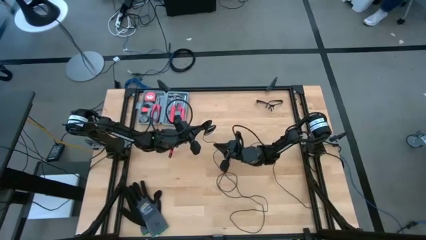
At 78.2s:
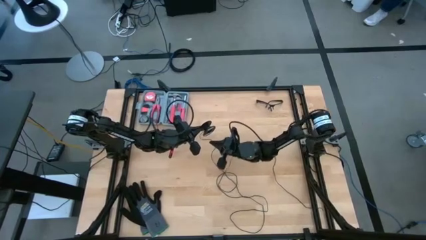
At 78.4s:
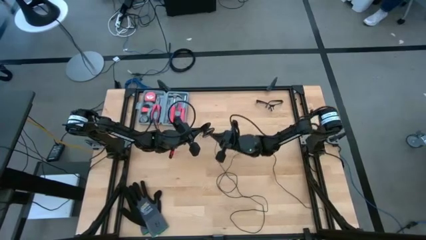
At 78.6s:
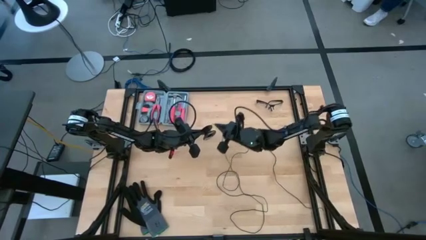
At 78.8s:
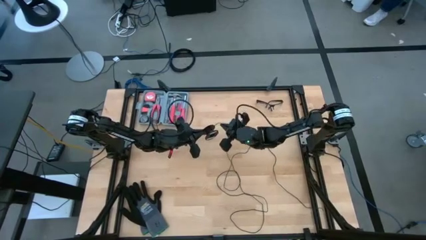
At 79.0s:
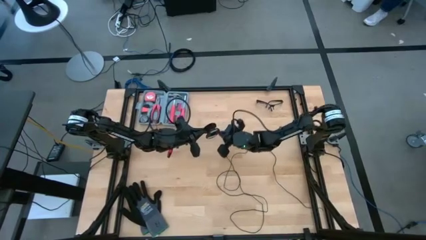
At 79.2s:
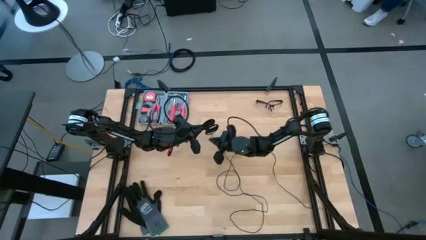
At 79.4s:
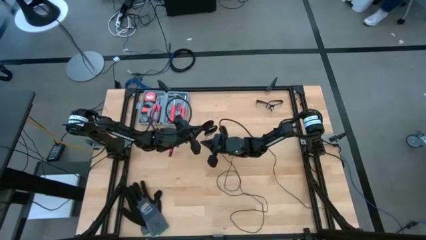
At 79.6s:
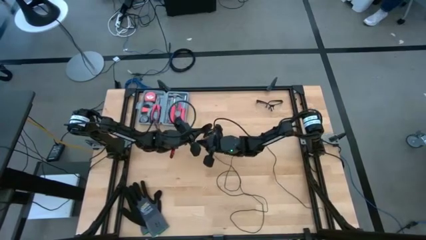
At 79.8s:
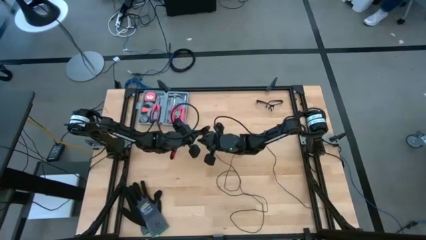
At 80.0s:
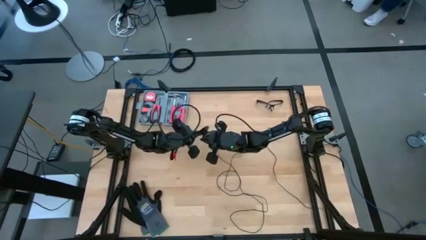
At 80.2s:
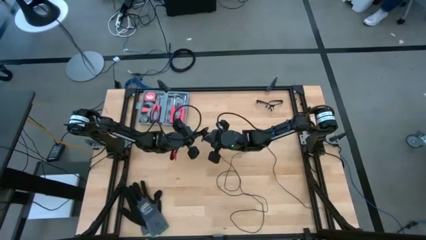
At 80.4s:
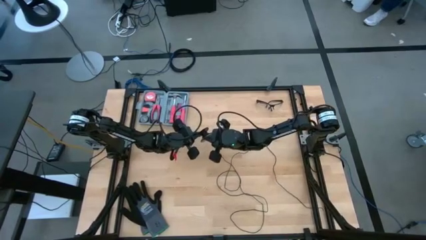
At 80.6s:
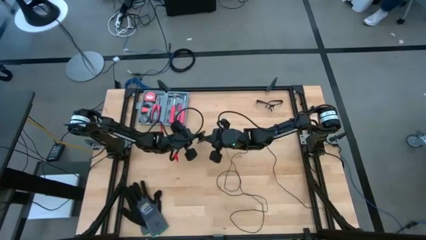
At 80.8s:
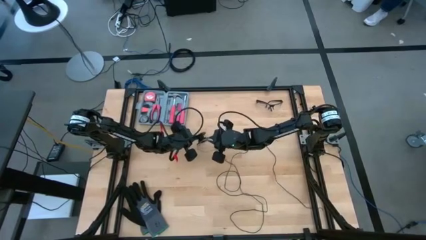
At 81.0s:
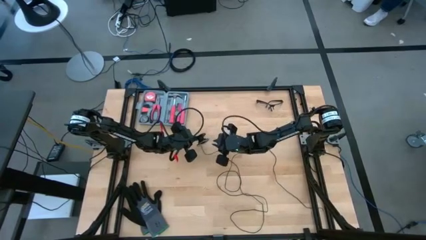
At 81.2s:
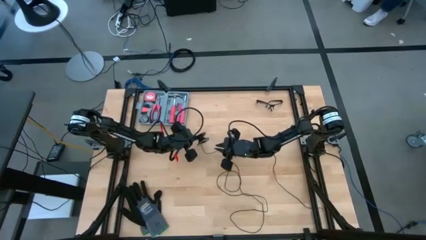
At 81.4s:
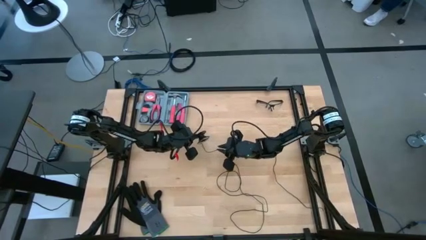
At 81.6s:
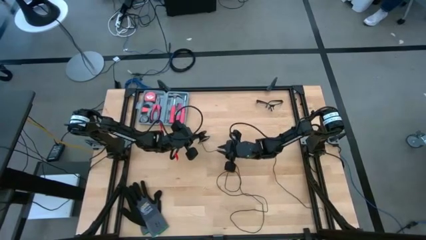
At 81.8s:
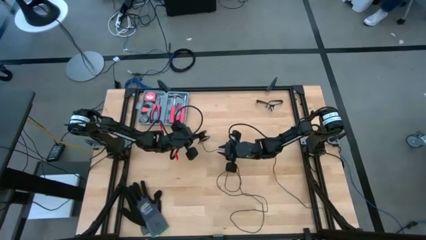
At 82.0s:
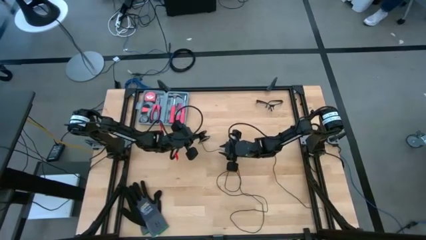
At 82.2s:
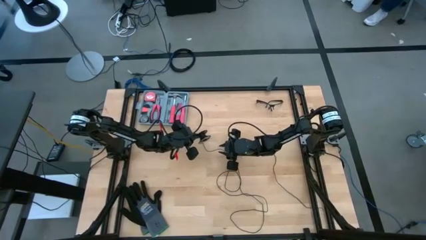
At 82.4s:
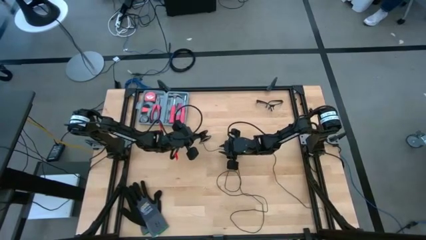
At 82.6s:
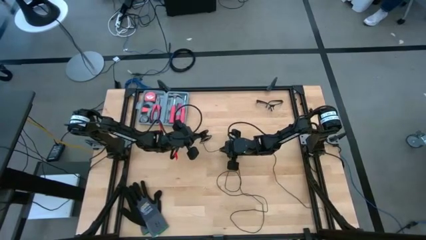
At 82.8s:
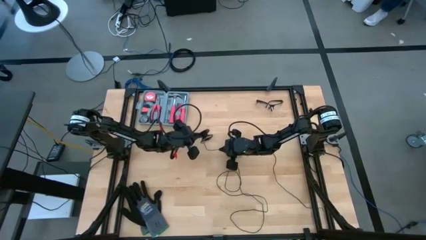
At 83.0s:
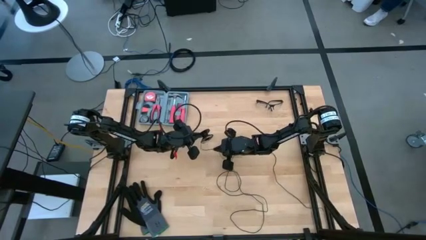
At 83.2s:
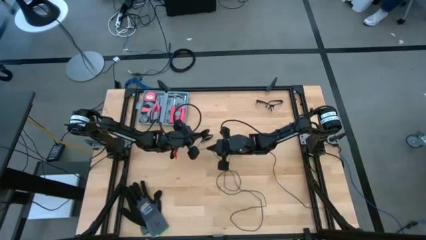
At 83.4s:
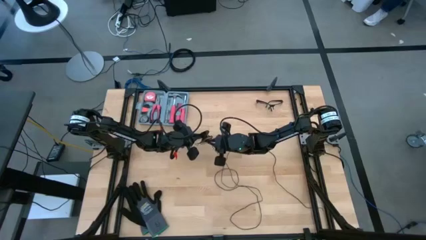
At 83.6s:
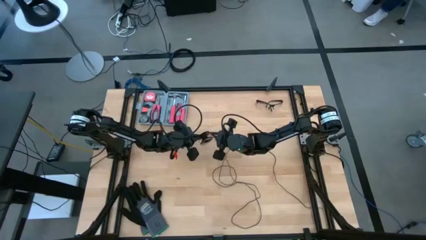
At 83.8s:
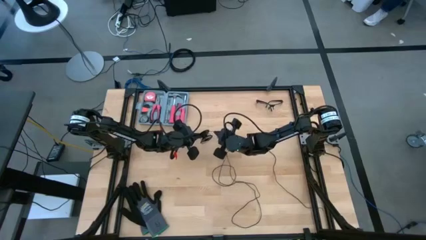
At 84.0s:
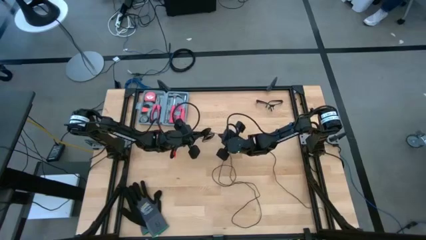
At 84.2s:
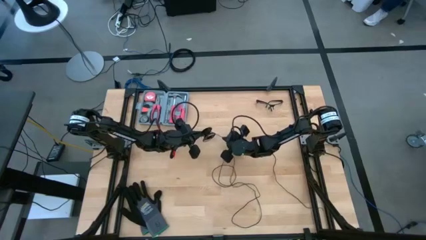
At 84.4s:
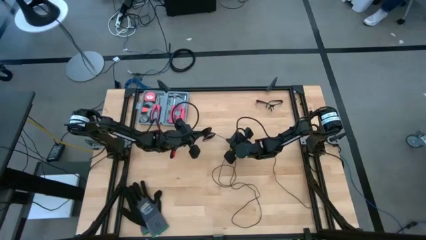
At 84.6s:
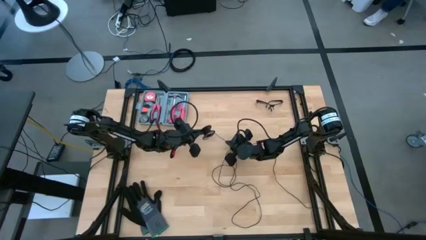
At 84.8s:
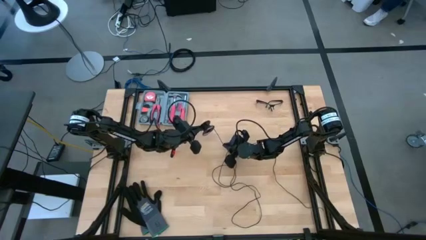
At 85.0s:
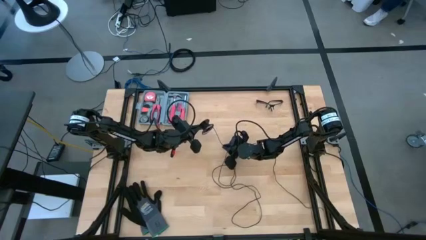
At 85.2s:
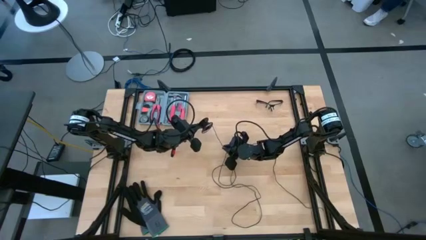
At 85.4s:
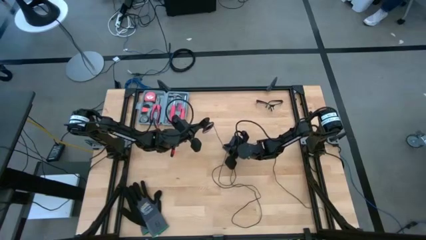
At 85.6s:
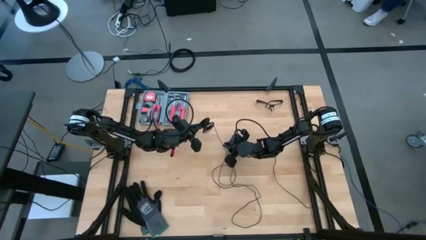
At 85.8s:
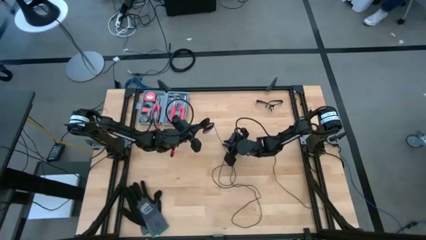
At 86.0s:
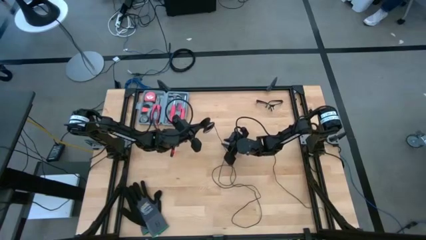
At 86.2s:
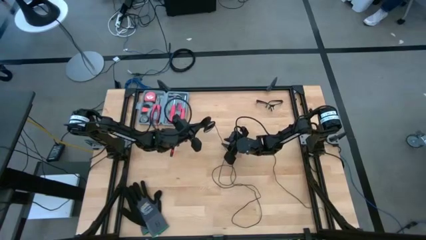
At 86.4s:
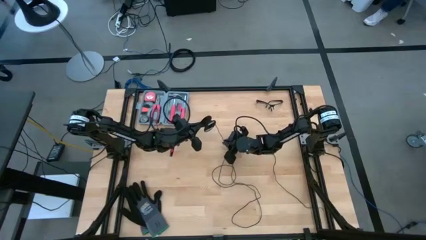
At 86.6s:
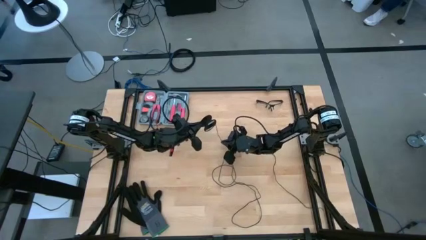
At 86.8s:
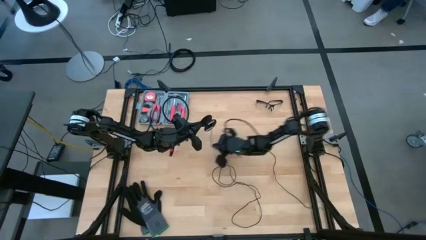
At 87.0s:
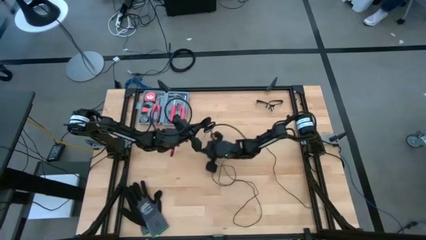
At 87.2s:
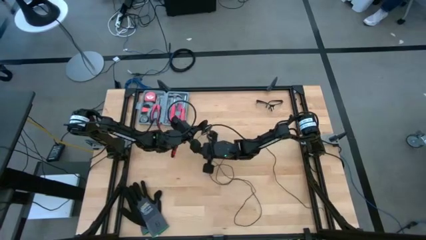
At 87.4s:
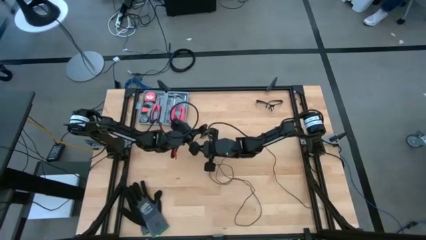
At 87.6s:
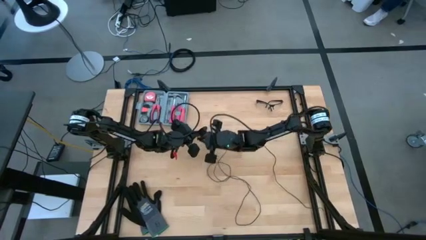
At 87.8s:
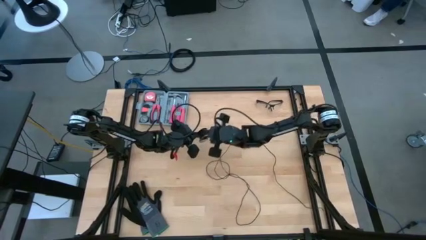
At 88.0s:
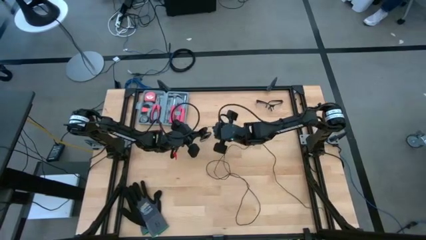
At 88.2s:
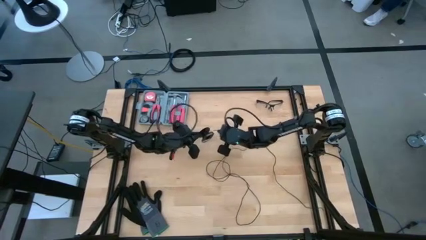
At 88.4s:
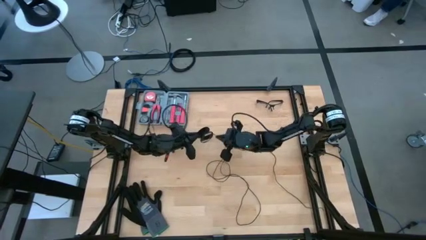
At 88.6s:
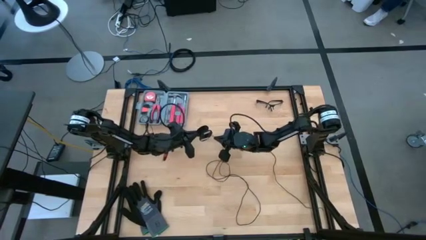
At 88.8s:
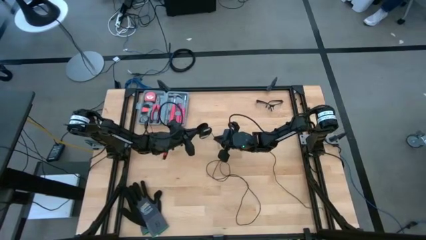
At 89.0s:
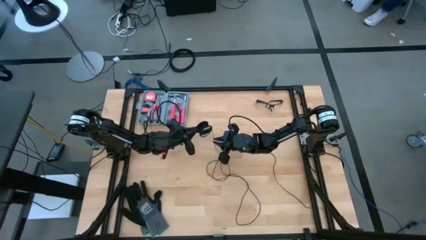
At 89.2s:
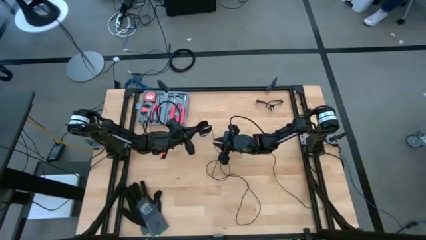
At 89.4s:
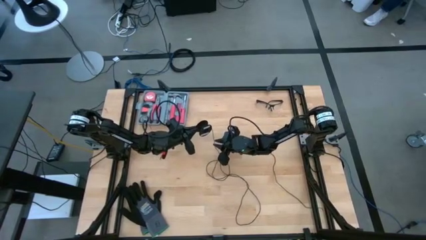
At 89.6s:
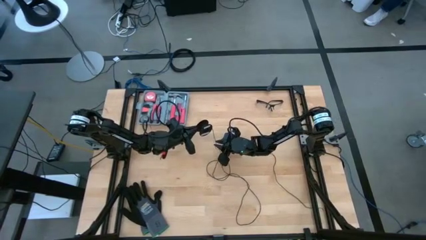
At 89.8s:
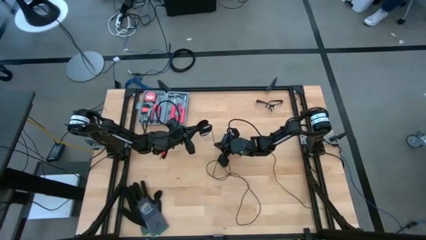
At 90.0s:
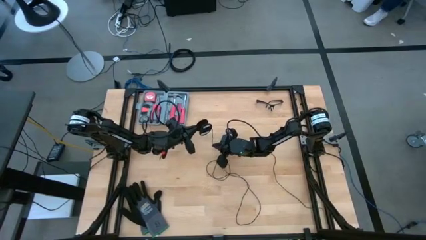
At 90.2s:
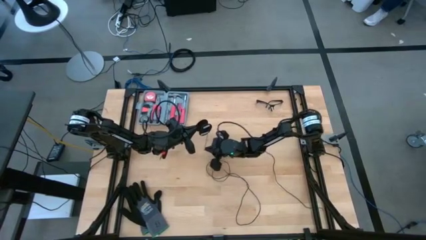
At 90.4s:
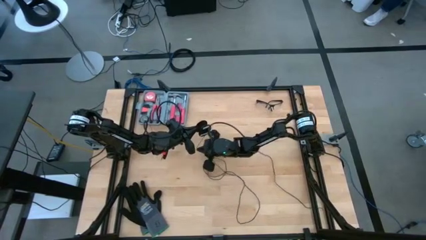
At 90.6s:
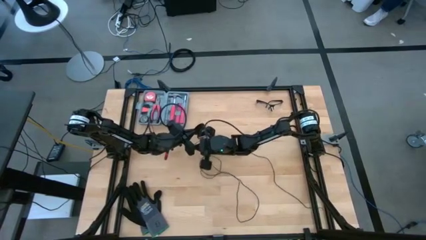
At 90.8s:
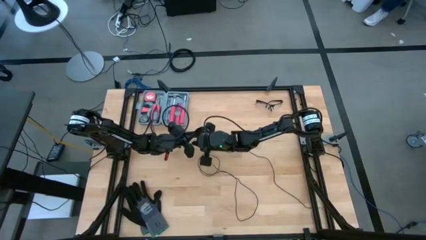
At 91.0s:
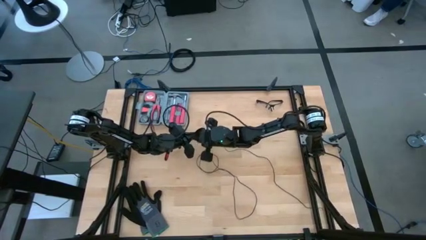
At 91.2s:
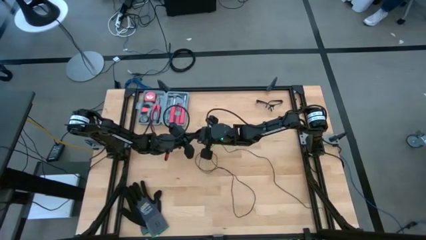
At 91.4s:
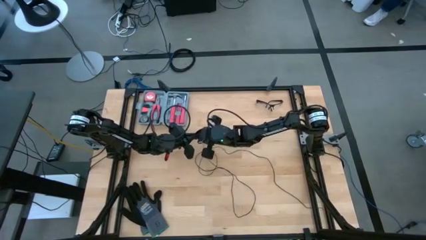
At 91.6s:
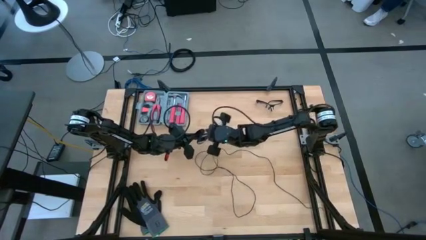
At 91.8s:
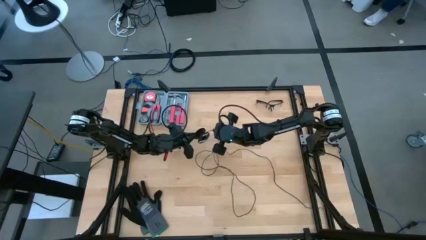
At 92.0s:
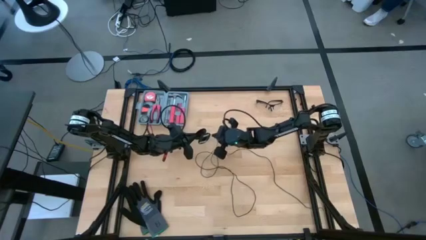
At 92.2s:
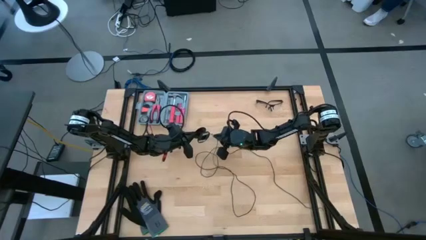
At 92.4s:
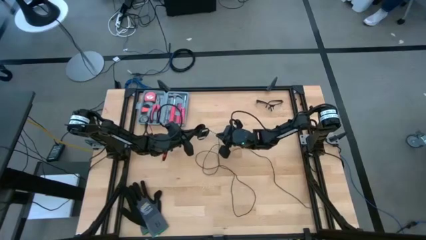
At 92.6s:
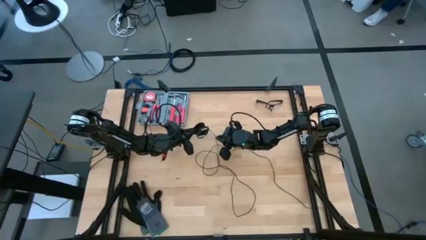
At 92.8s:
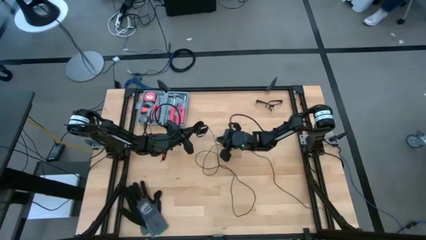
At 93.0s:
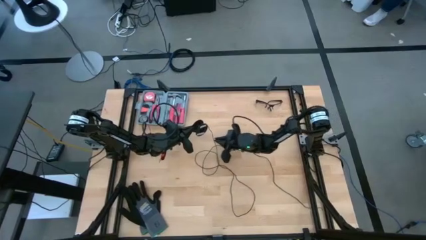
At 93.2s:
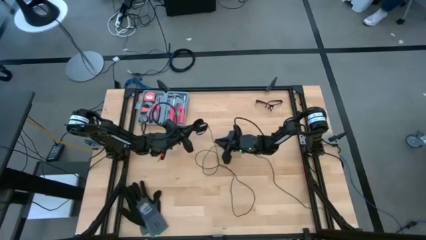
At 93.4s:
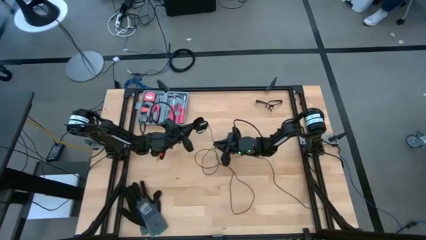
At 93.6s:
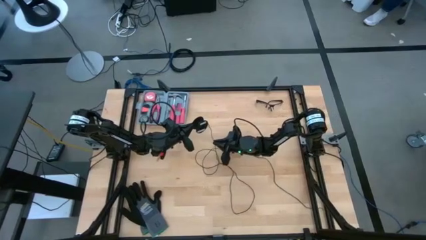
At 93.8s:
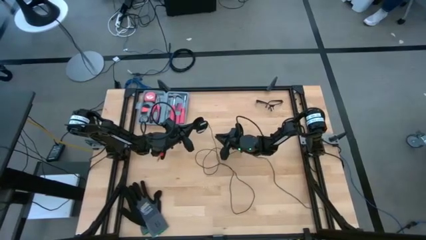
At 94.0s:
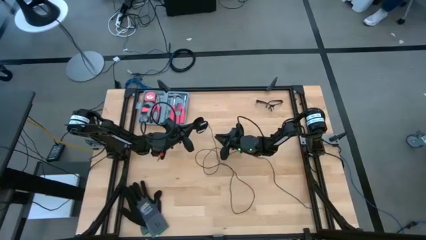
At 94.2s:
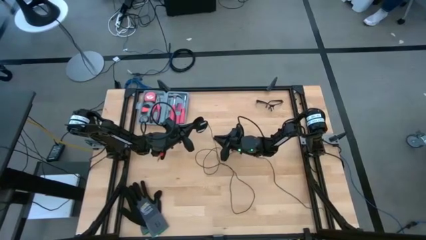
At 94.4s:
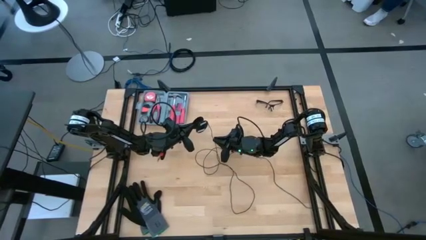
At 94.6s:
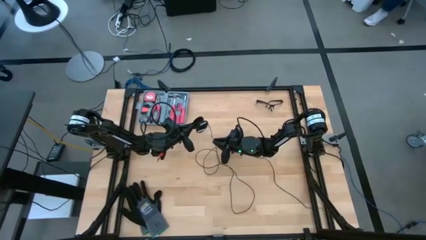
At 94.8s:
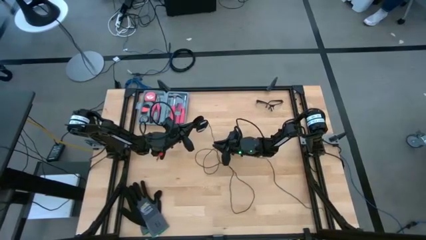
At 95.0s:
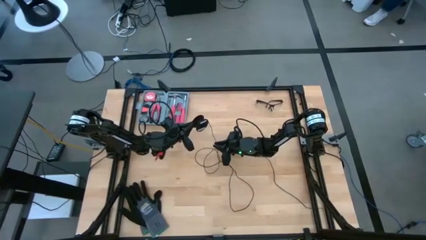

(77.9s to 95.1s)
Task: Coil cords
Coil the black wire on the black spool
